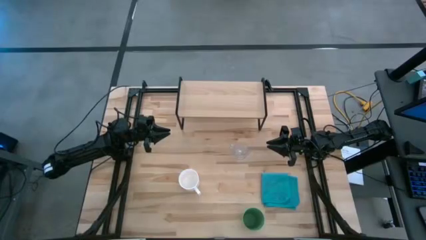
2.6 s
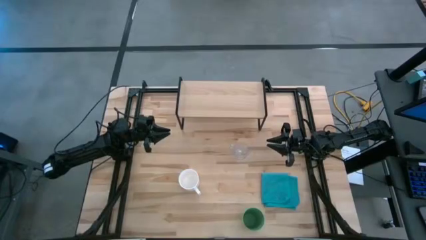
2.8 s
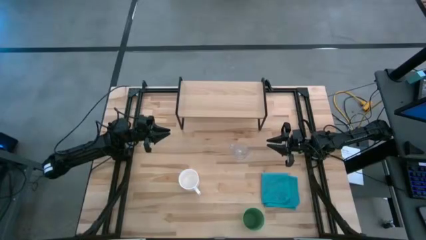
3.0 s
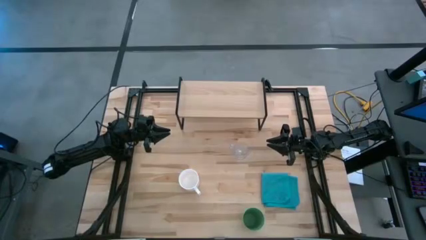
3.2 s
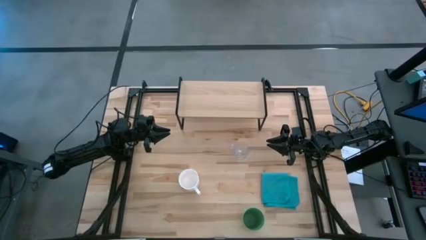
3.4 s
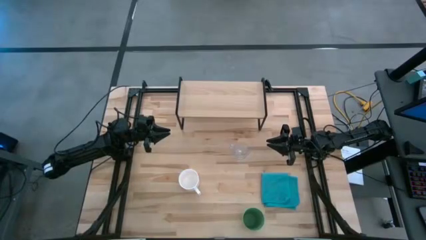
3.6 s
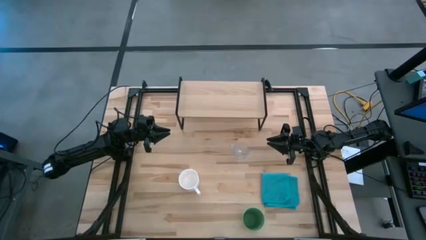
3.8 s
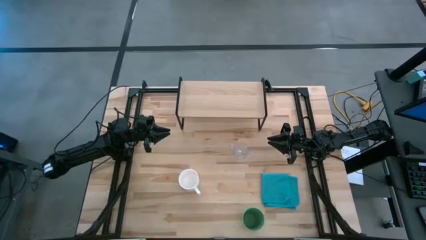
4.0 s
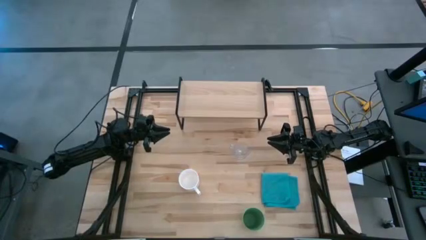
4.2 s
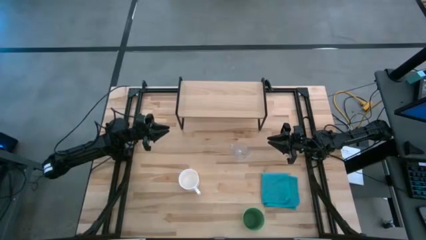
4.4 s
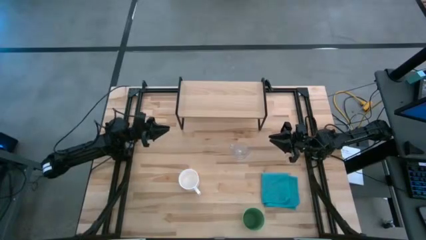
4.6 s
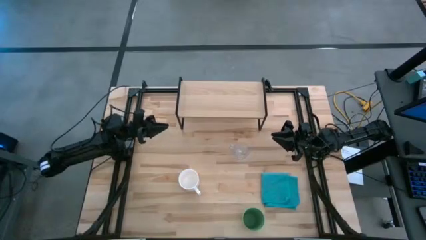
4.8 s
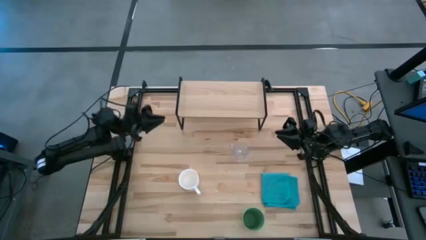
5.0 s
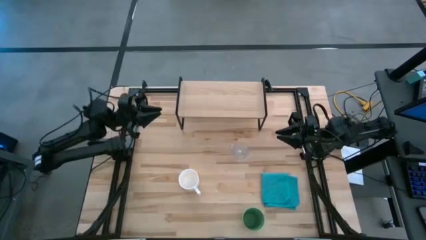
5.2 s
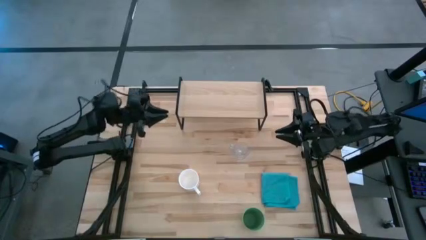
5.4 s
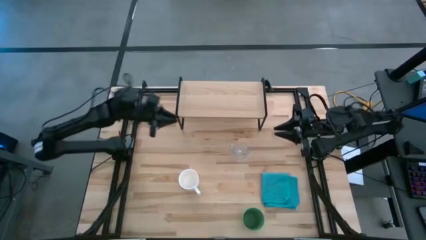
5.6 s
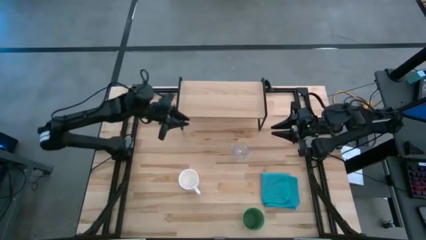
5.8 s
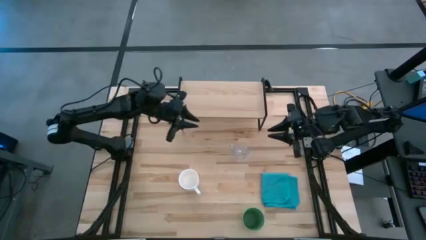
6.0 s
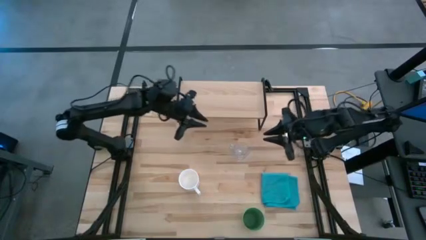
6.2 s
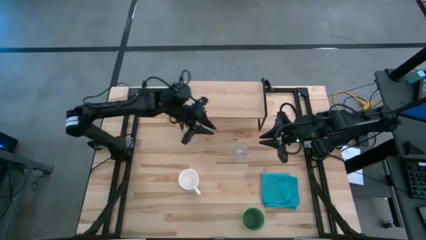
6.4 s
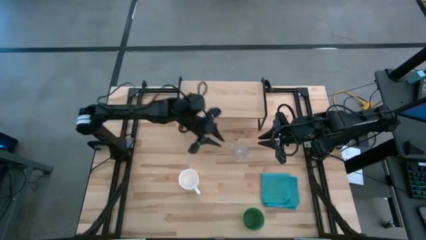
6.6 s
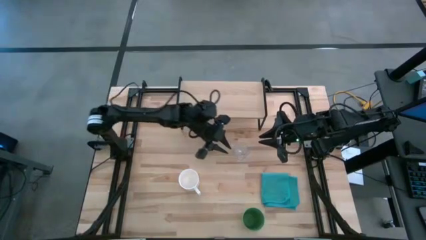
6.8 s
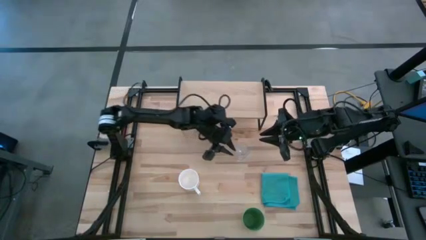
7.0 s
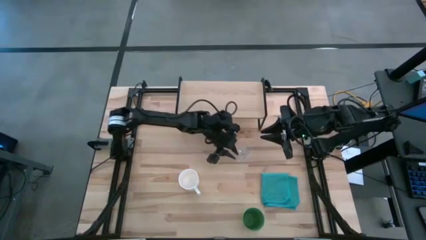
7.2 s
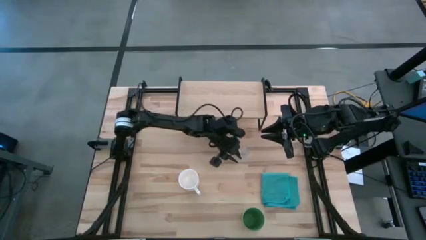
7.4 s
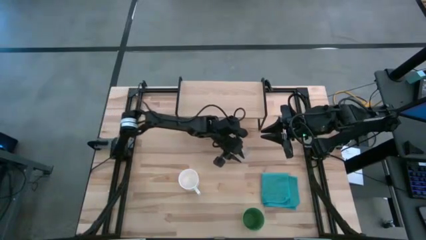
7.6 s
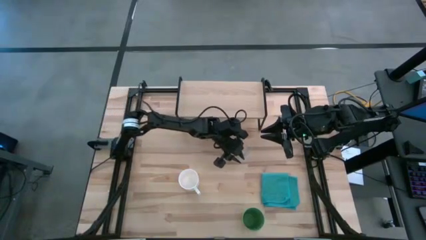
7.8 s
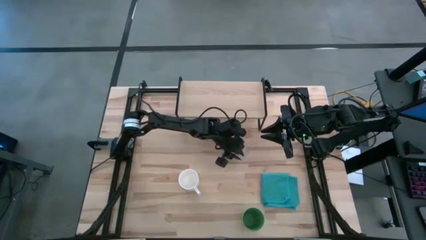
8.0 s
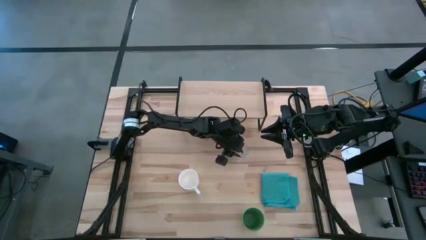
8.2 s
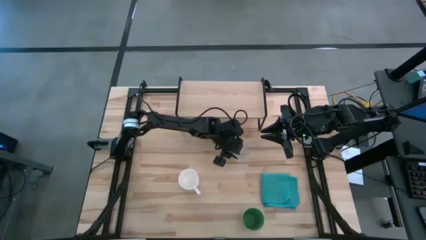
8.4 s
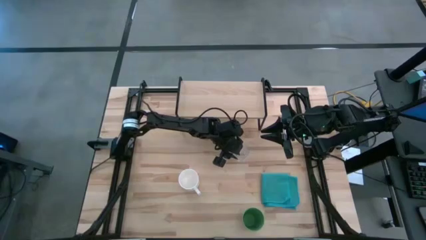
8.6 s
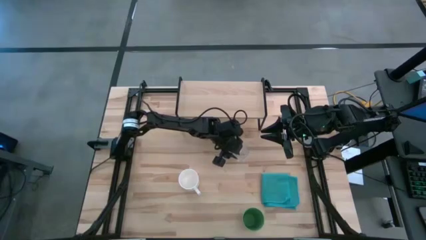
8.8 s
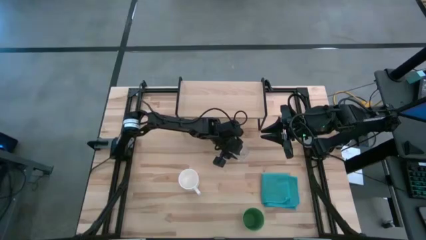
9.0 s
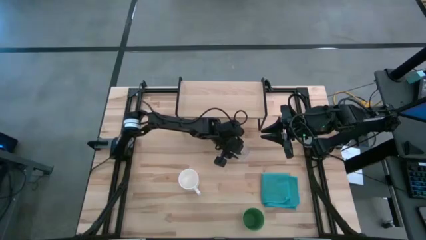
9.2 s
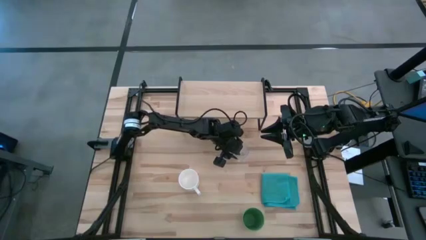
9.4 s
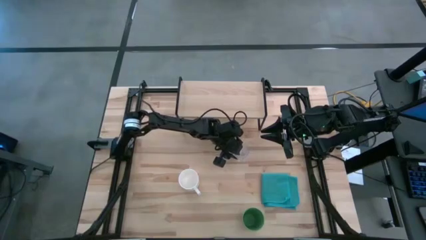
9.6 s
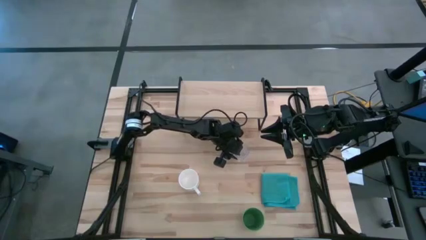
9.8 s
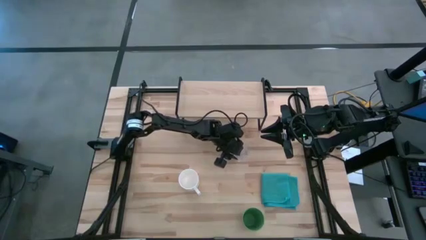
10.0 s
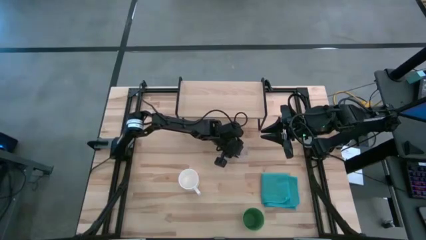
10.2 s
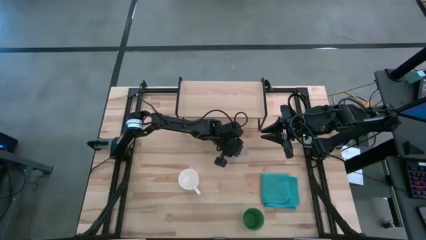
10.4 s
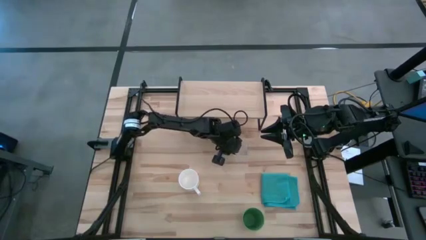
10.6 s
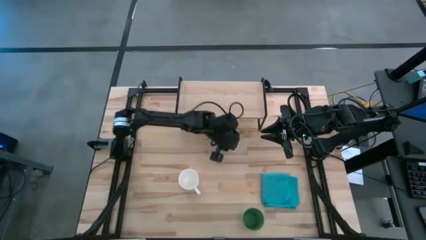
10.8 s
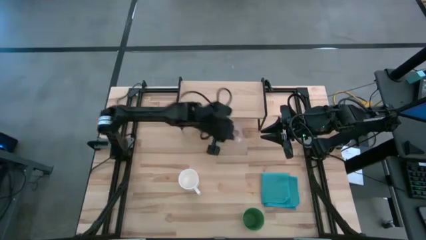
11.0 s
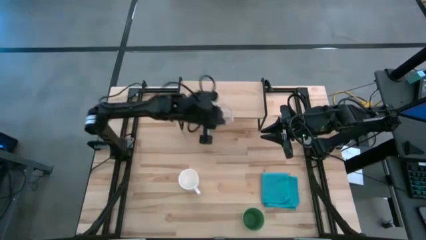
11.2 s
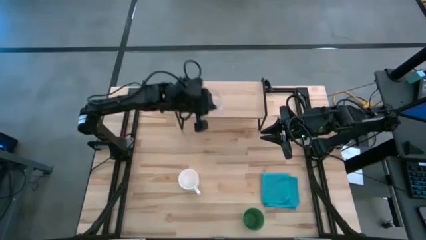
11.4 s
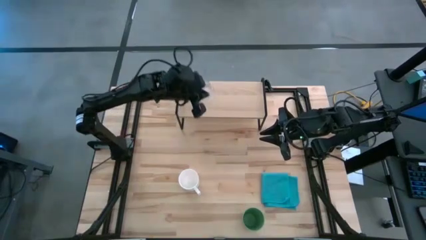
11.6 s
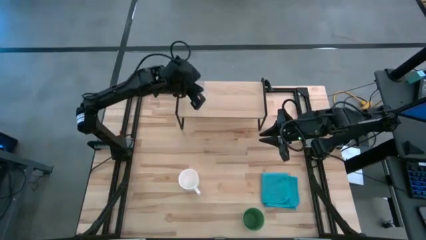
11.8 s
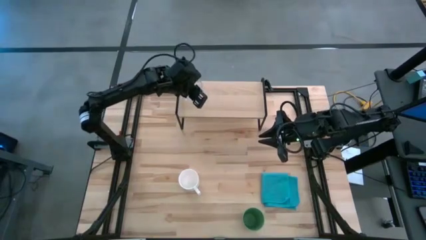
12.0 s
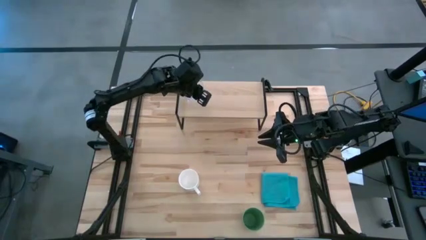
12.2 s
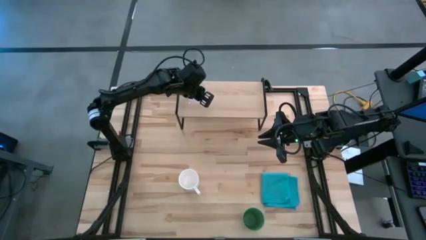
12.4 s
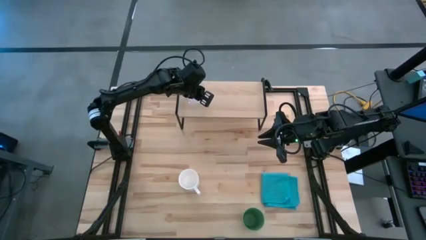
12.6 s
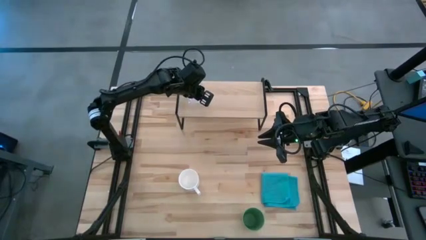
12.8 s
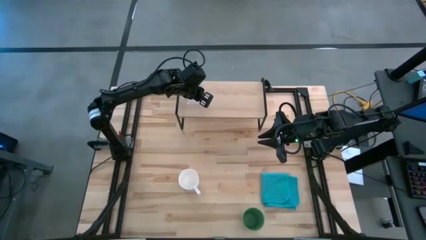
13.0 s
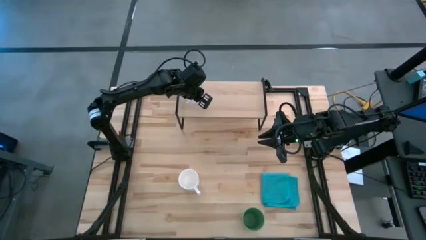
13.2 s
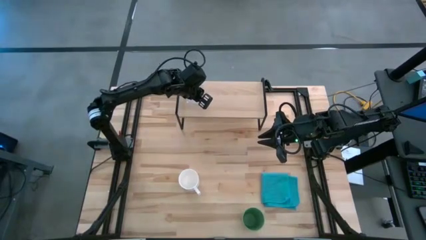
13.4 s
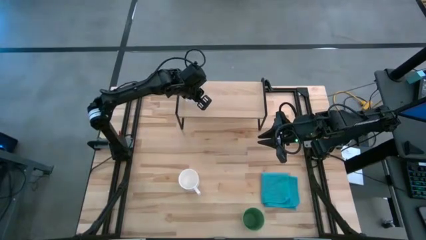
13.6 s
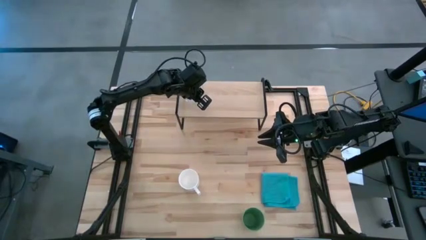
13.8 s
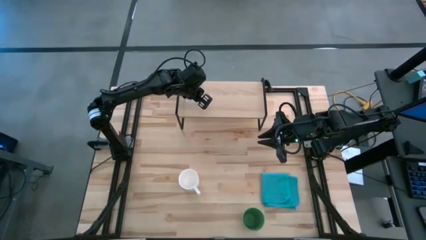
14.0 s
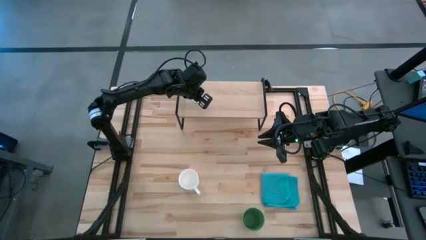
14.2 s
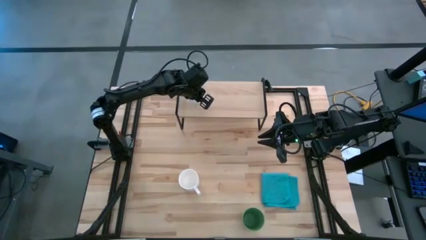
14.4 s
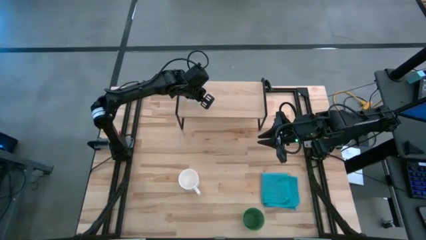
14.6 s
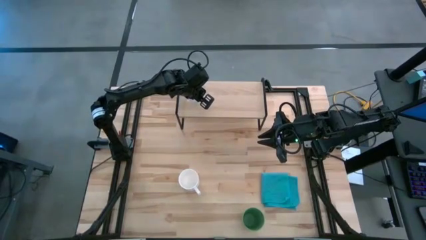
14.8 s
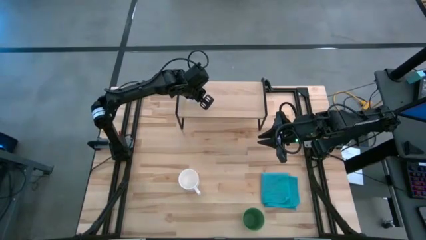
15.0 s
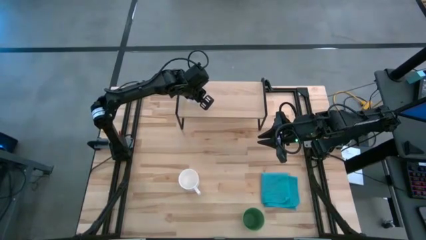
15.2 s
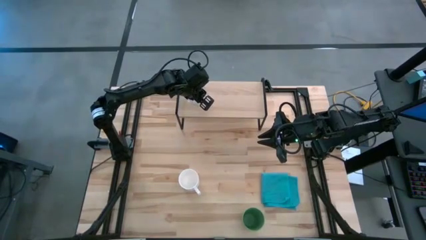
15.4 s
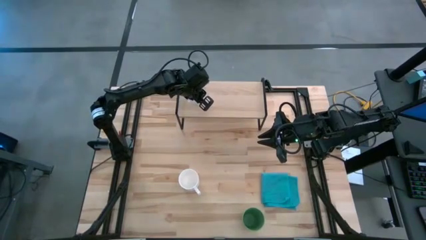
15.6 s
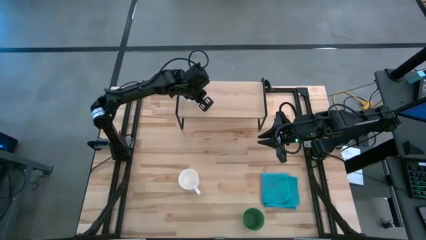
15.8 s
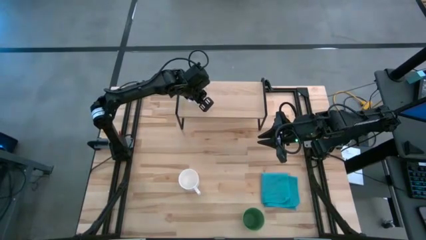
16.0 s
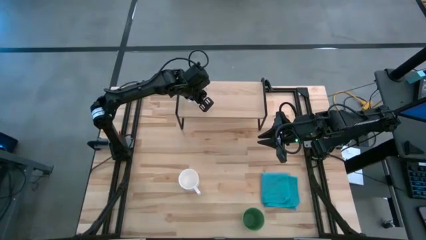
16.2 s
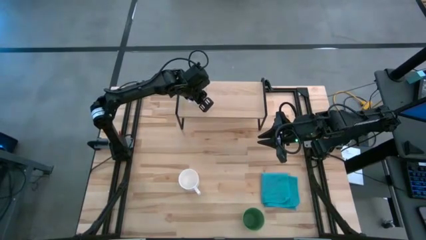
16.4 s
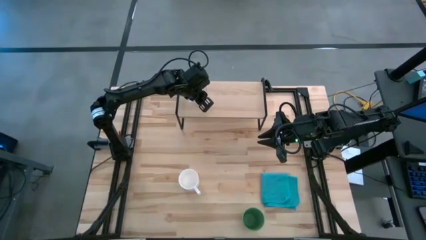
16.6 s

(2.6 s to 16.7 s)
Task: Stack small to large cups/mugs on shelf
Put the transparent mug on the shelf
